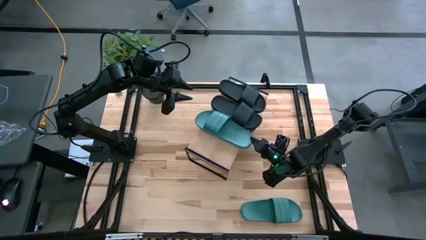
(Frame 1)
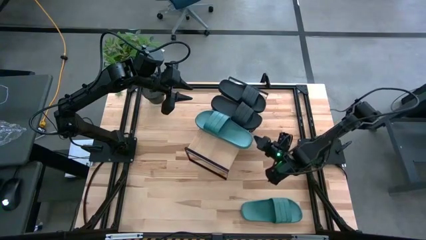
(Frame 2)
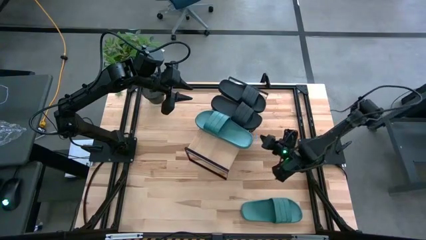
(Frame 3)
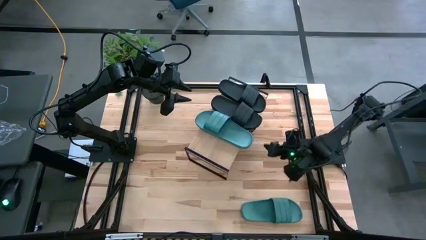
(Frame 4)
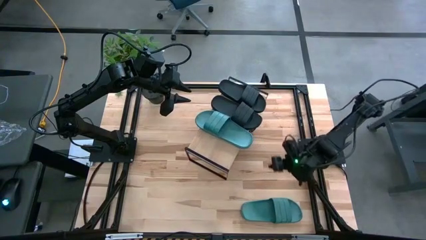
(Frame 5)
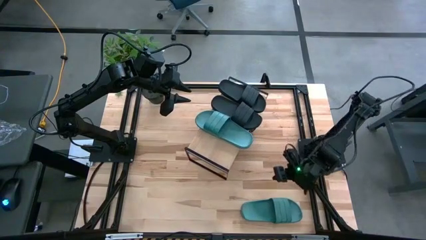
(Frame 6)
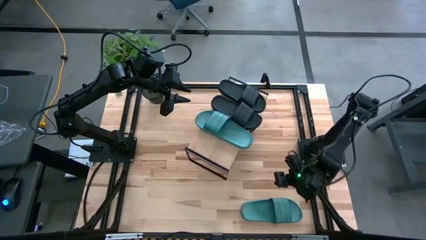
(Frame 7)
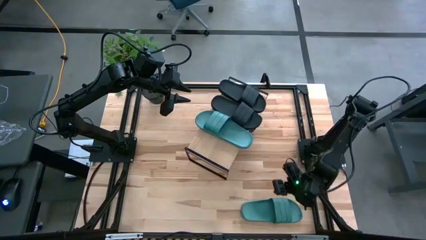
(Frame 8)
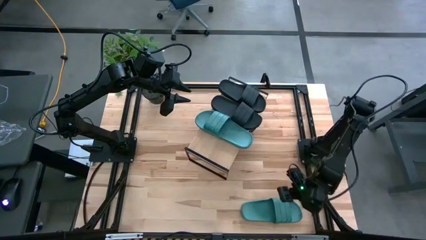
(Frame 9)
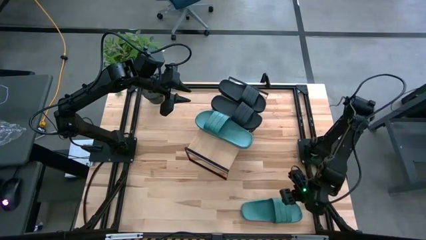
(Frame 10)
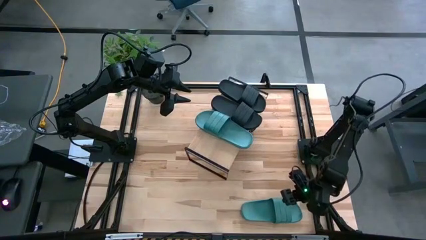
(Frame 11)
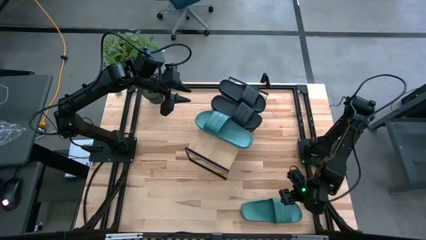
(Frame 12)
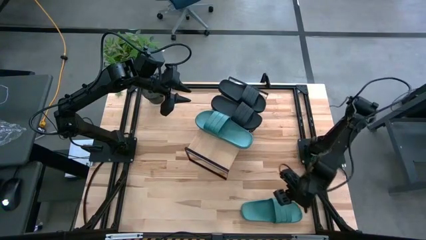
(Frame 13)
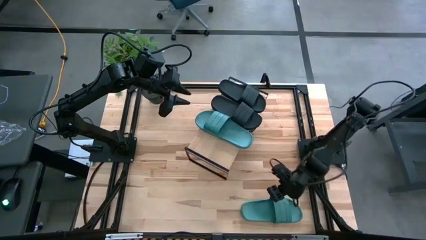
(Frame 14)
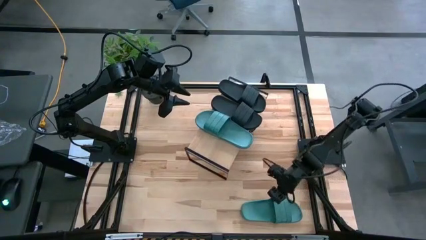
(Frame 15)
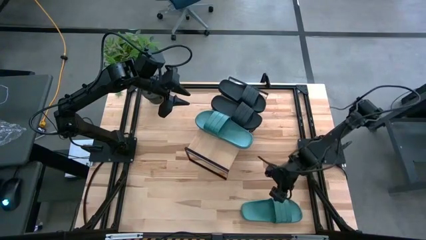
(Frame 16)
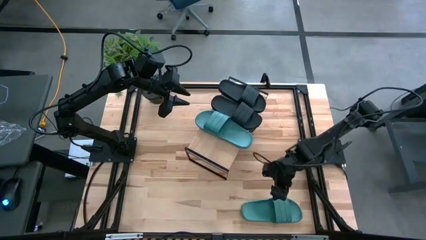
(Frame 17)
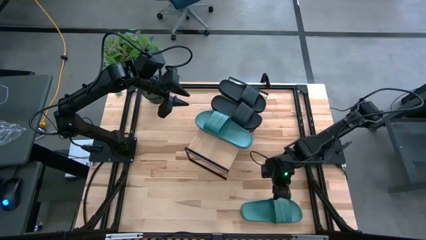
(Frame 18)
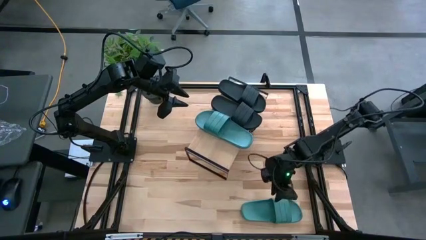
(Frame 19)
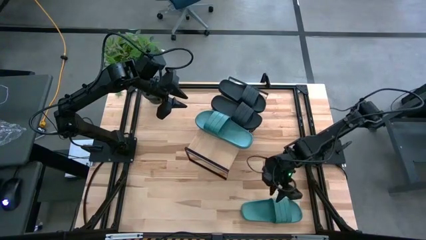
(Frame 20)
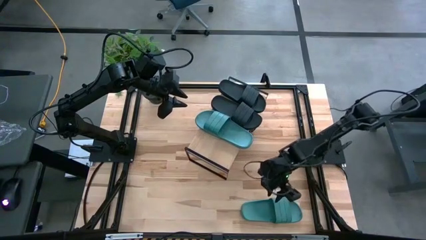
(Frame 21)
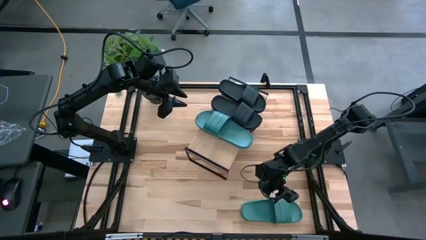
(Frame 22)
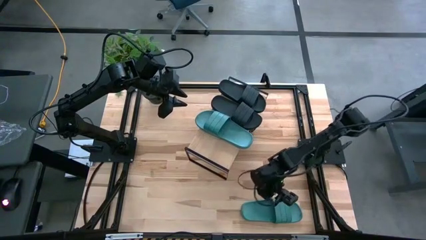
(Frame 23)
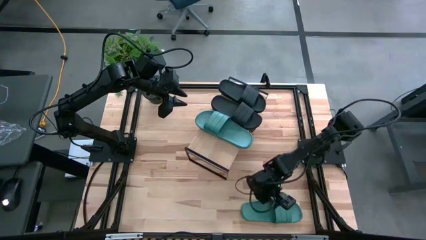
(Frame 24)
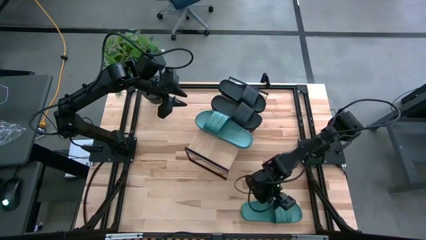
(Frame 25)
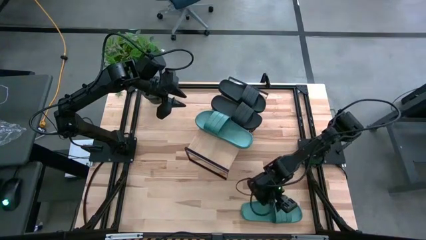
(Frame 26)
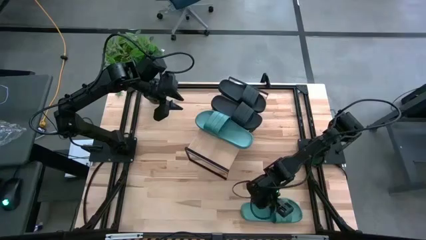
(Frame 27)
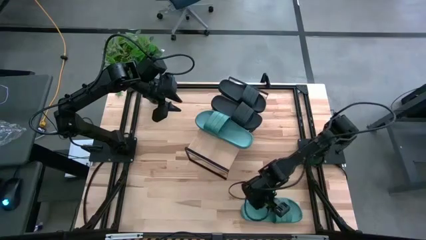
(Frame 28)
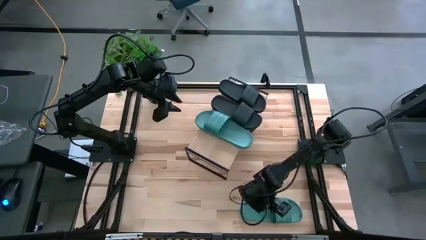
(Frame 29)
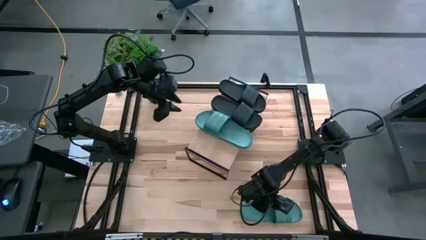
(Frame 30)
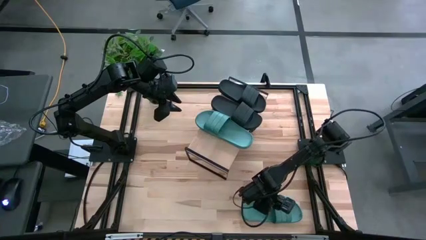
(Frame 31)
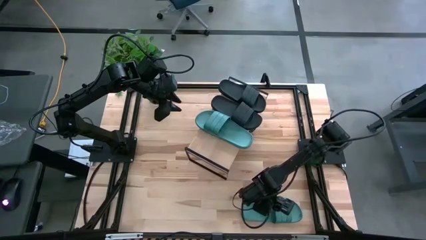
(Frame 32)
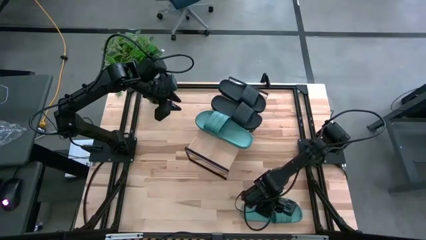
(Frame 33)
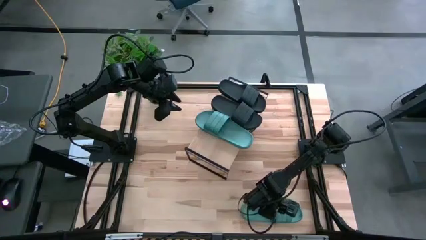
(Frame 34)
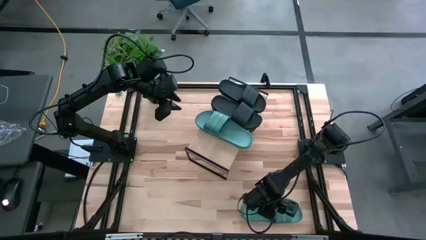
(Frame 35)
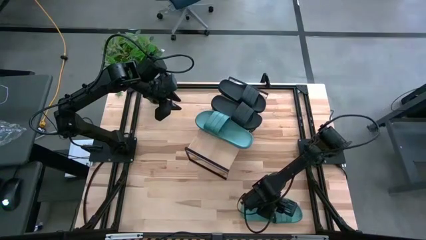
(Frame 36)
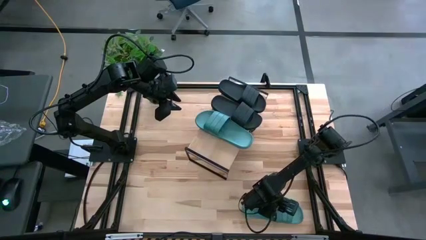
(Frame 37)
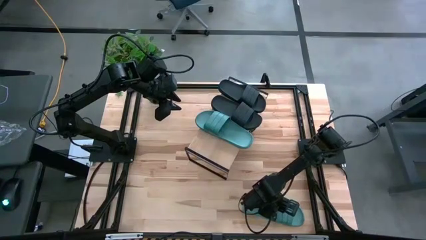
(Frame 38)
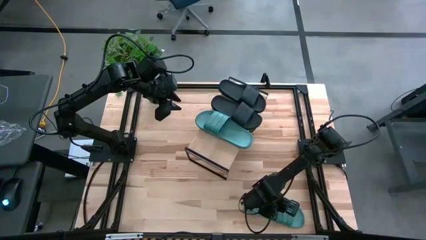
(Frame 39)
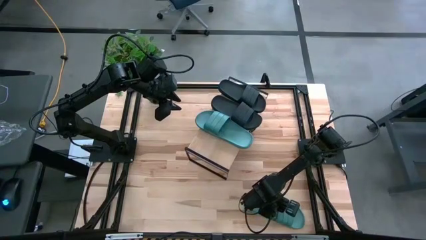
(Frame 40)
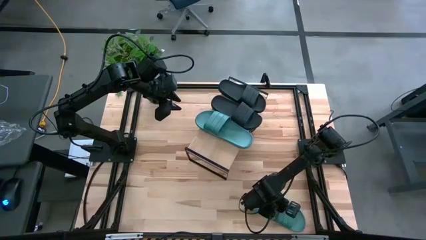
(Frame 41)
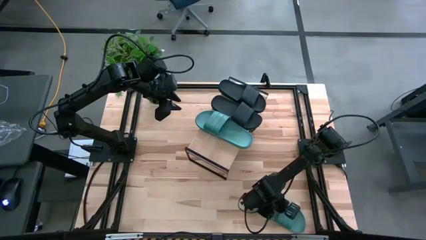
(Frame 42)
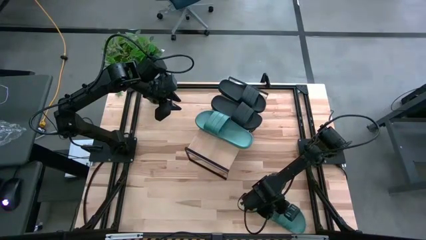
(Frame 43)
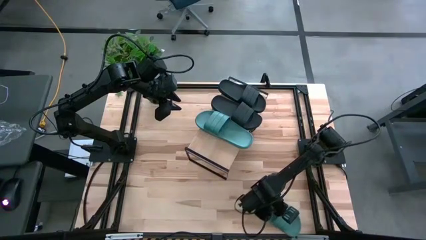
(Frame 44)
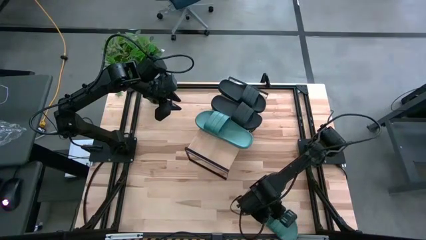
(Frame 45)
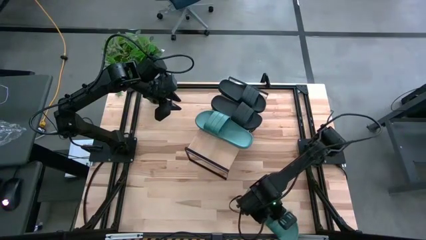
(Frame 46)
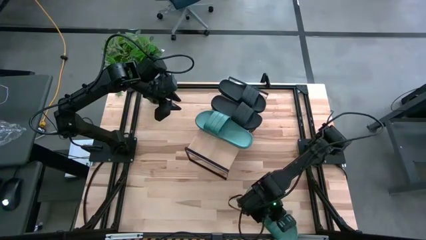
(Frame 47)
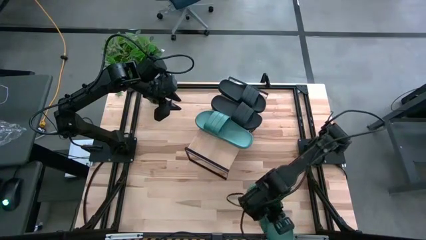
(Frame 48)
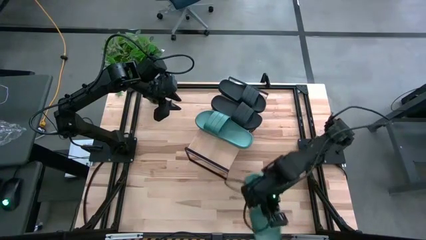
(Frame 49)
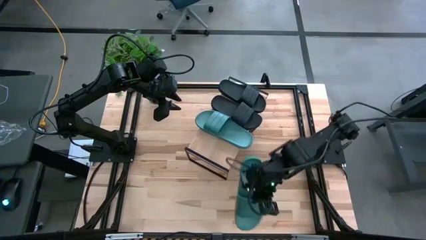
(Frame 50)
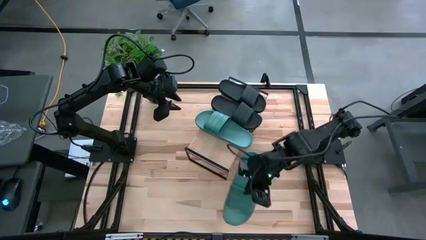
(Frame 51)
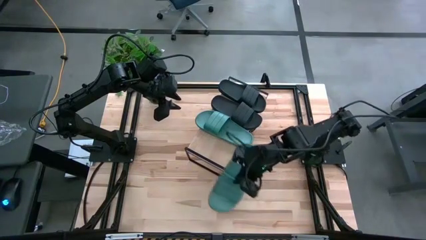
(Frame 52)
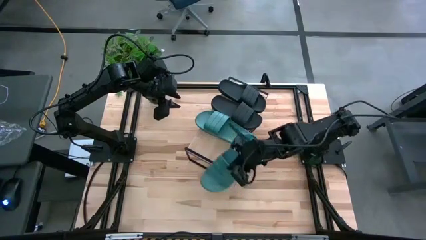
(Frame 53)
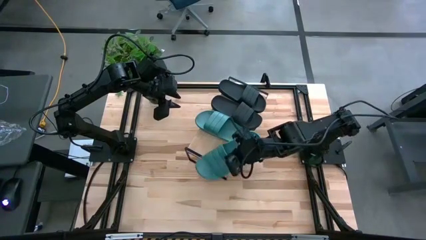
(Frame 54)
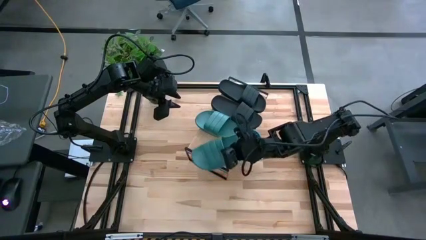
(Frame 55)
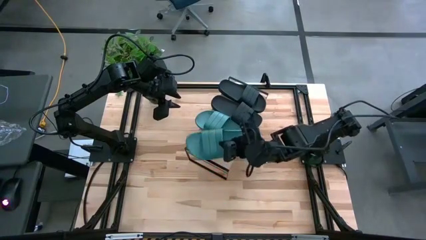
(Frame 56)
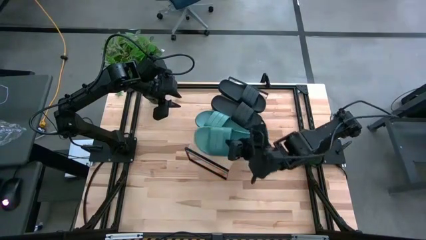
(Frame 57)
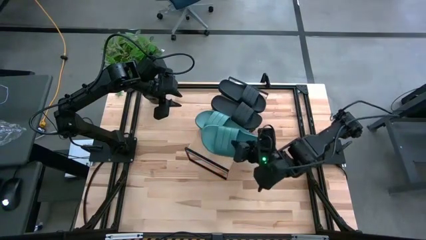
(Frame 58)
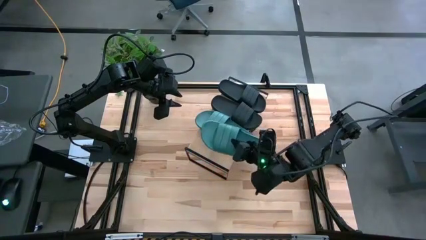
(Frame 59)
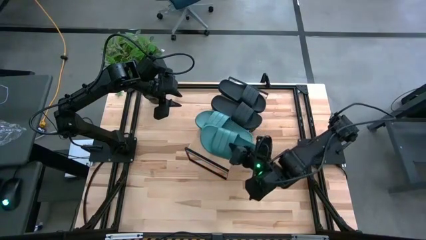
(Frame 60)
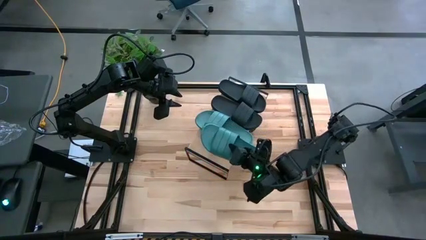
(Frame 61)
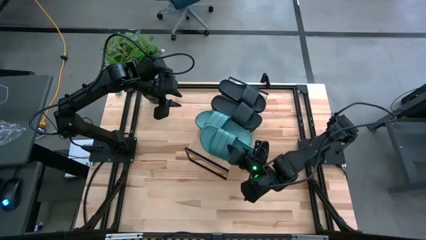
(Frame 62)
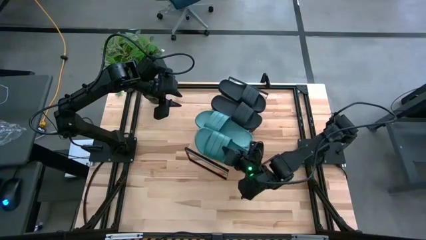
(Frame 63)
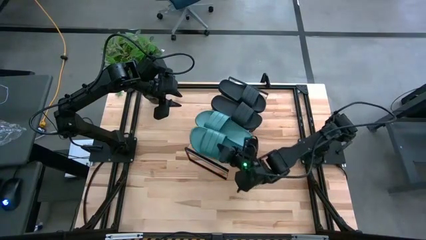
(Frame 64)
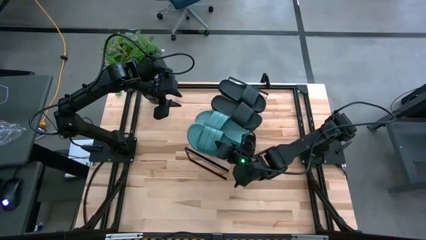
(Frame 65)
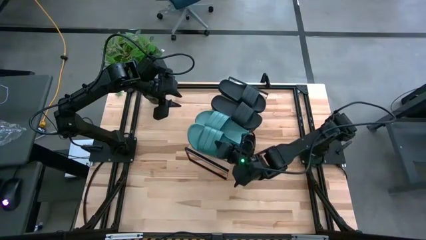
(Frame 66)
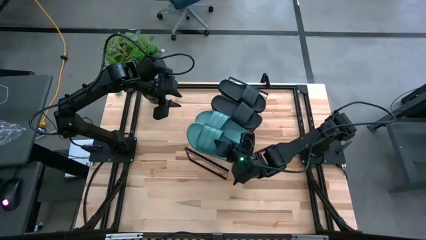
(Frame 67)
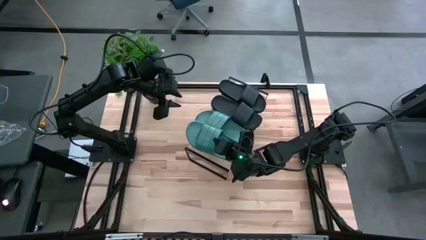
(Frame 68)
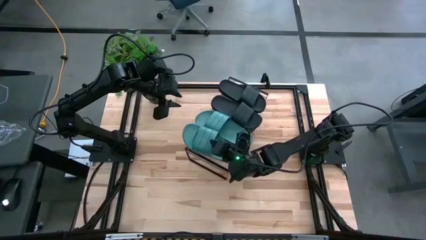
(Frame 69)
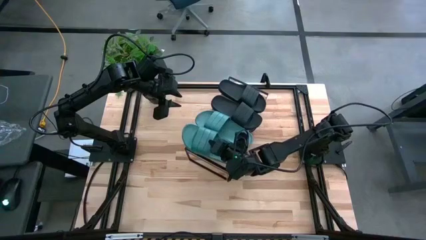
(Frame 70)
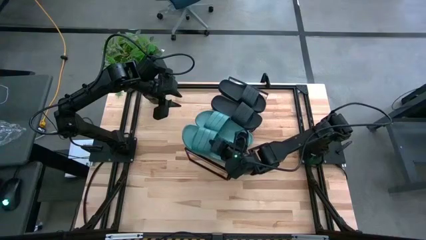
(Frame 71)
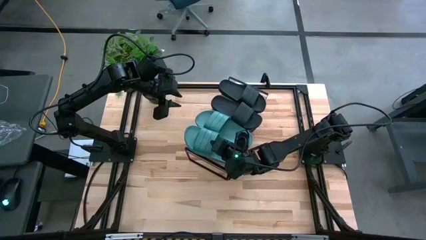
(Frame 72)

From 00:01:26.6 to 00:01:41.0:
Task: Pick and place slides into the shelf
Put the green slipper on the shelf

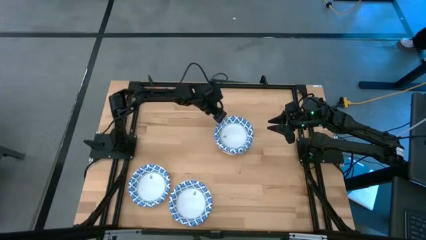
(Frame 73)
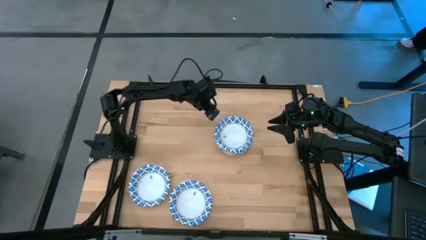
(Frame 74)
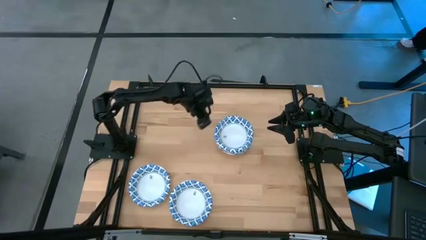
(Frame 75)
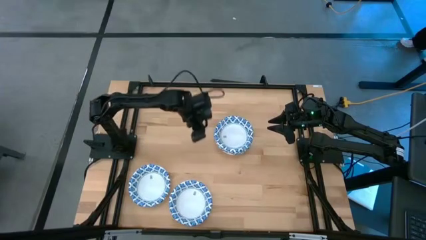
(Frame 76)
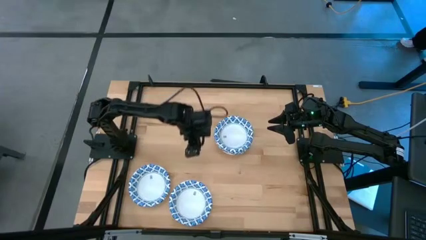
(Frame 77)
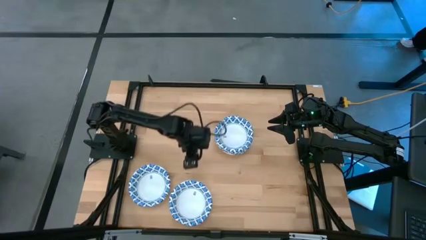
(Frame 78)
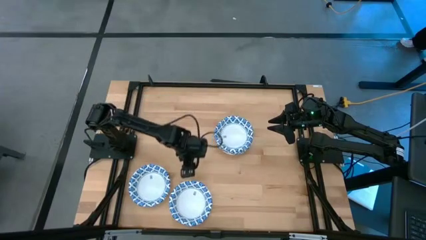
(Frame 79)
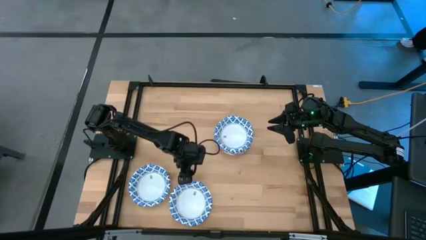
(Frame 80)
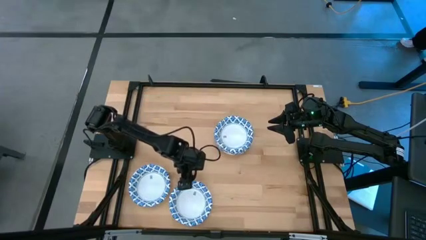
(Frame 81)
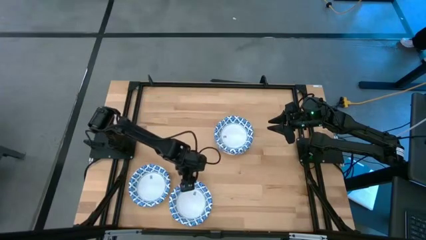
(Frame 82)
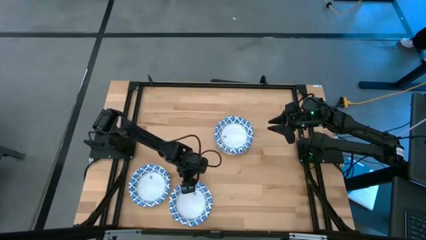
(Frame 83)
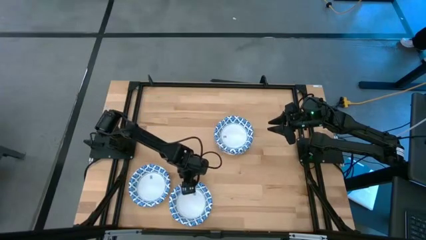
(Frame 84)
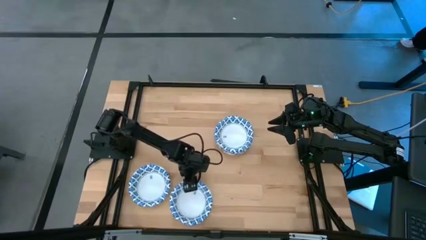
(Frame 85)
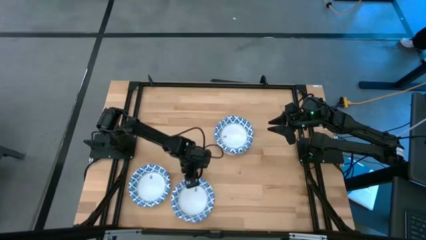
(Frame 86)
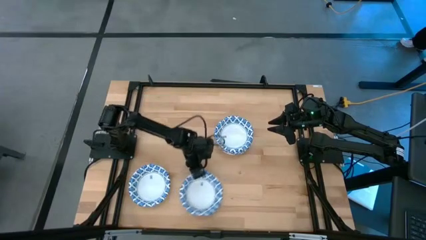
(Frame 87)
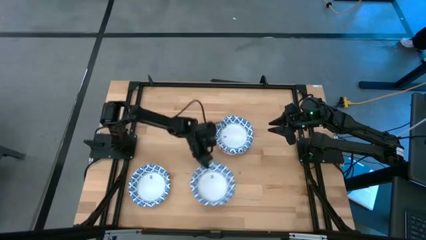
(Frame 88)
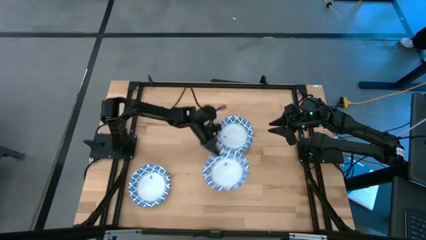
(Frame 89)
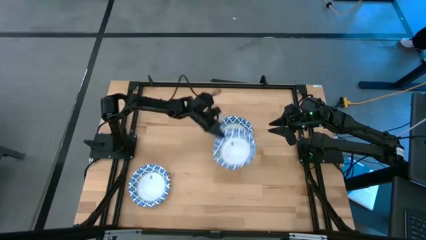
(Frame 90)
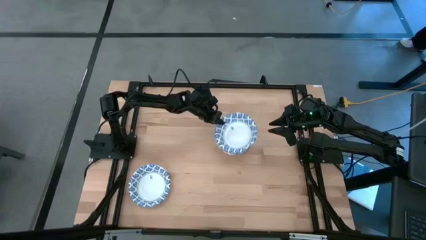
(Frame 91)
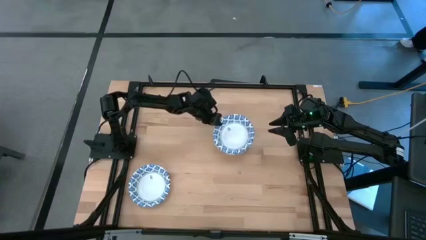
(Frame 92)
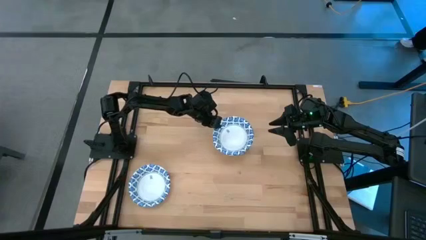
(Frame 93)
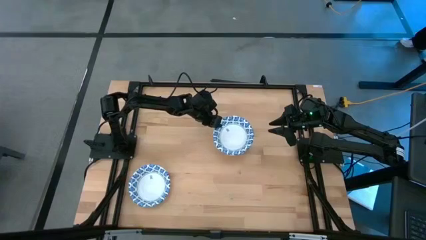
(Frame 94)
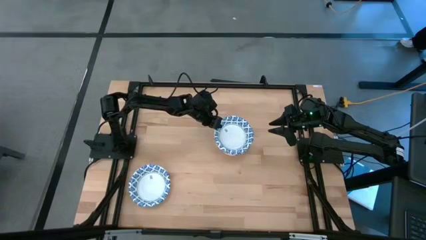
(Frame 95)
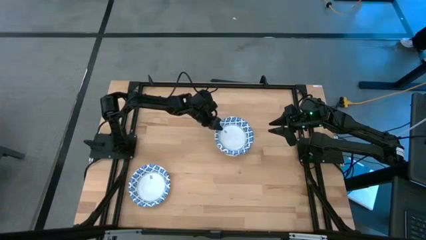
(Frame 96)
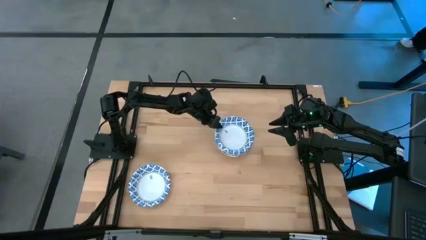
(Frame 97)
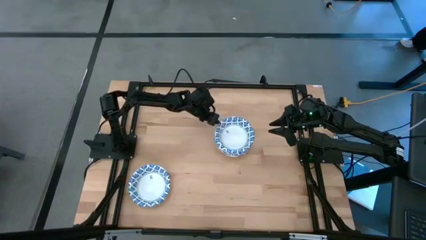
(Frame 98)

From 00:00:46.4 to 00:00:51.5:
Task: Nest bowls inside each other
Stack the blue patterned bowl on top of the other blue patterned bowl
